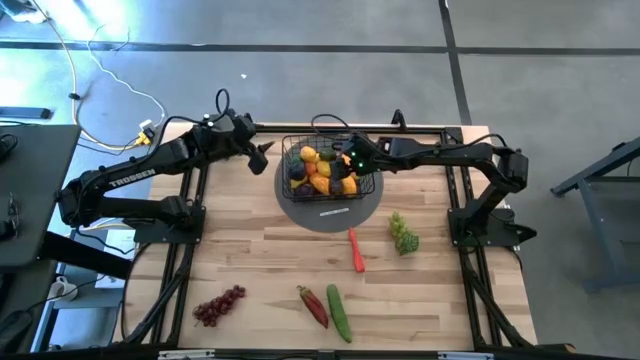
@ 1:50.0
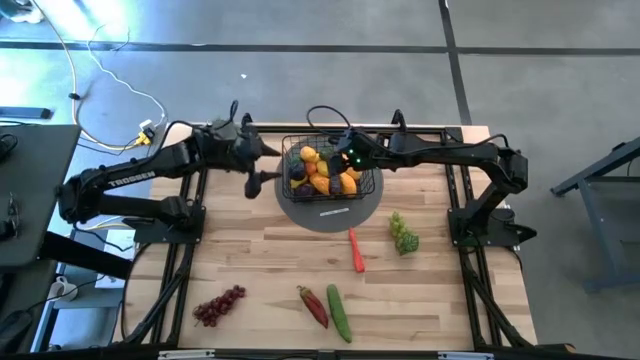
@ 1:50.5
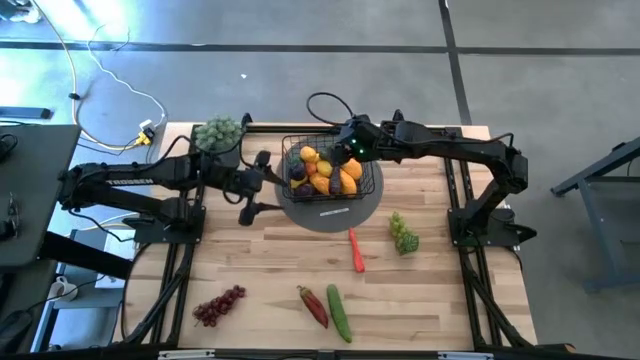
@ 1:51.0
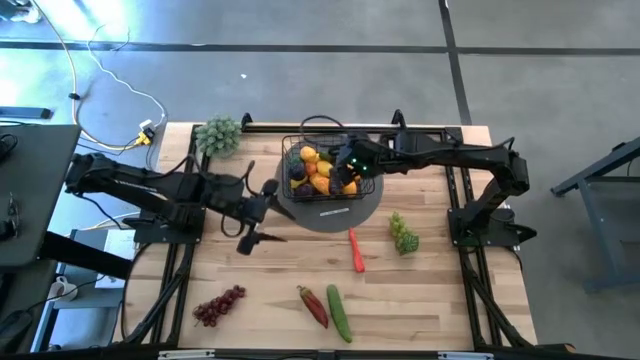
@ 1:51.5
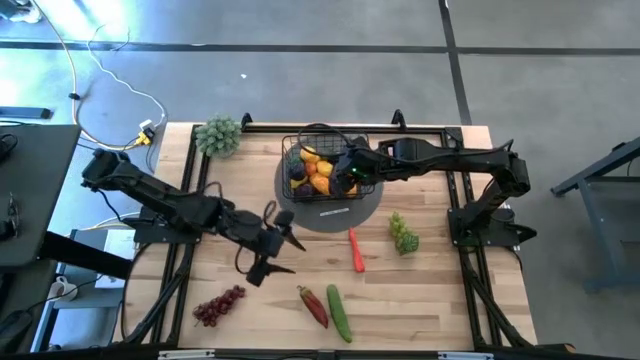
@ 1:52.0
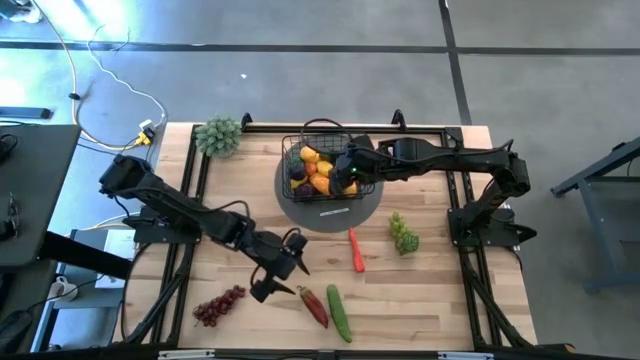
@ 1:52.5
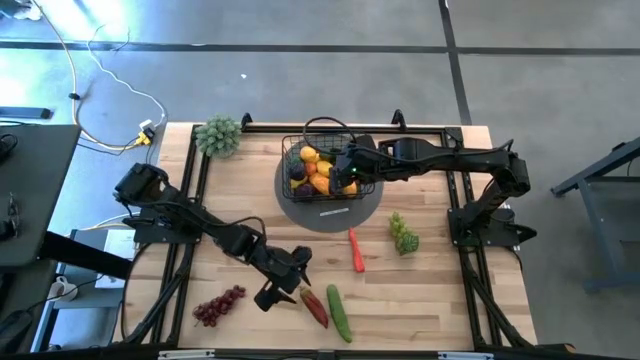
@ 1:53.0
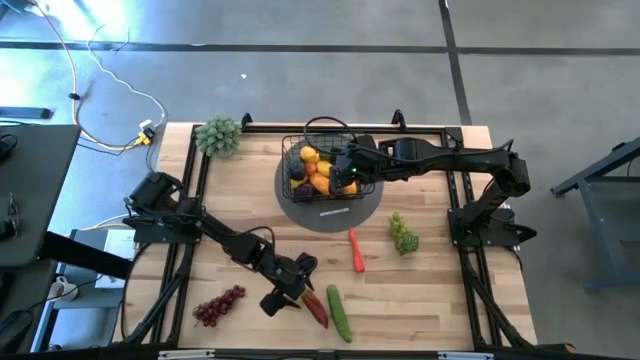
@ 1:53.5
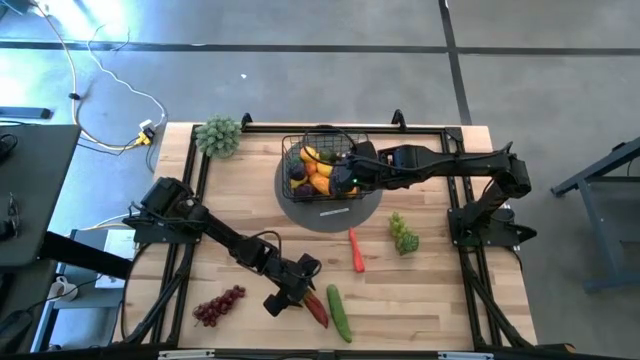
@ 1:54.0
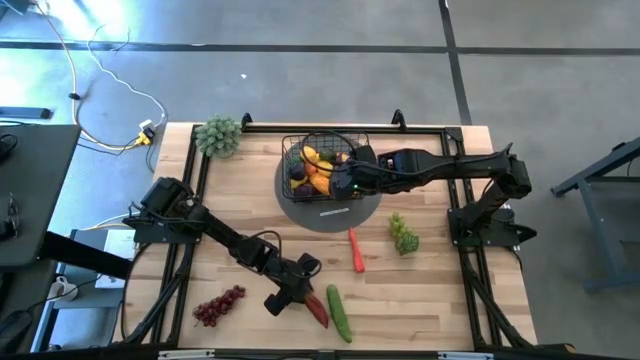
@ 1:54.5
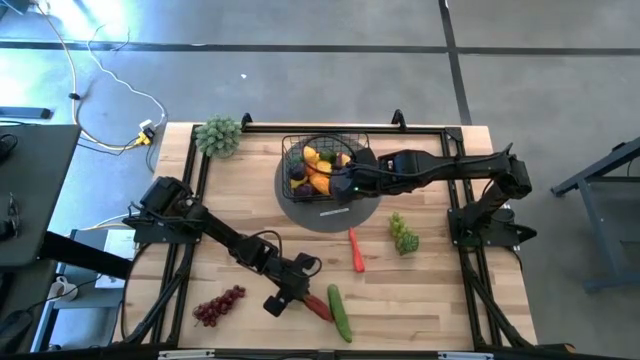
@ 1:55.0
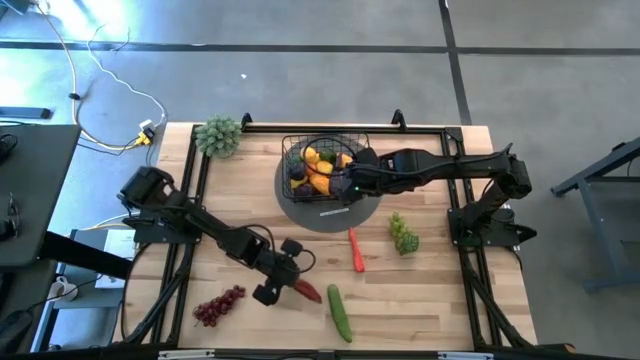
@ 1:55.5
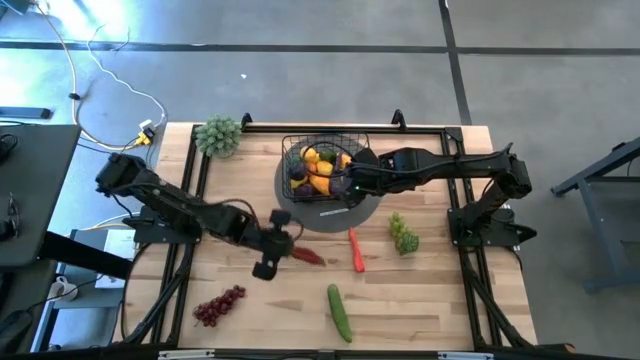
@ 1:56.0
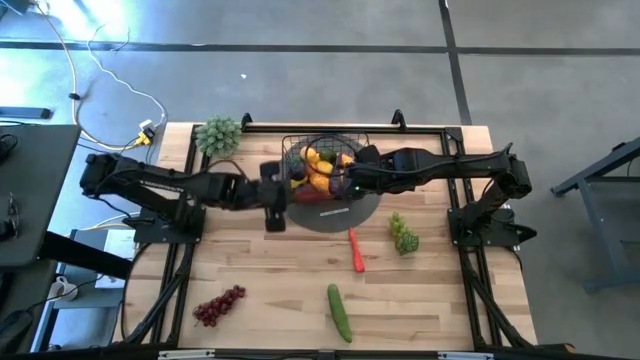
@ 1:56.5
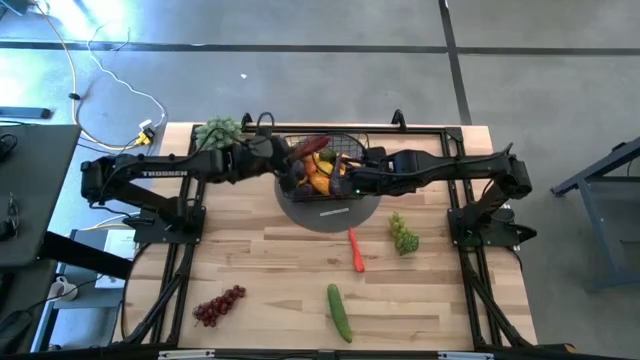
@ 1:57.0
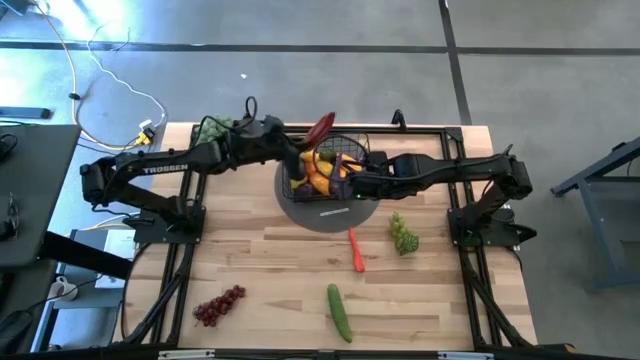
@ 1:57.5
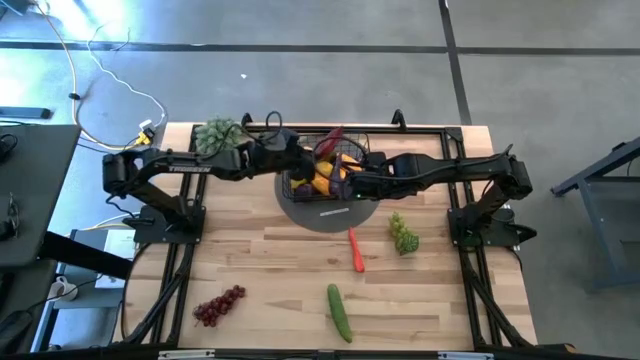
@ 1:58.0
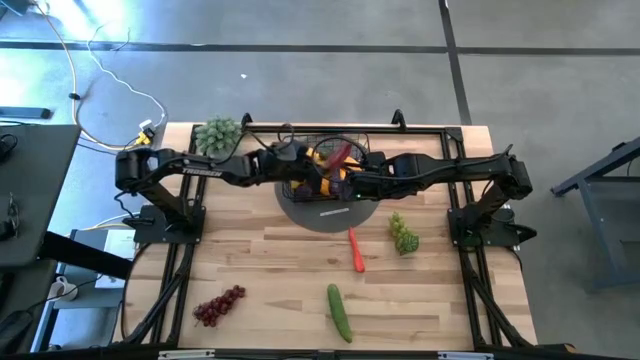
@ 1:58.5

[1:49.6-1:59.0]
Task: Build produce basket
Put the red chili pepper into the black wire basket

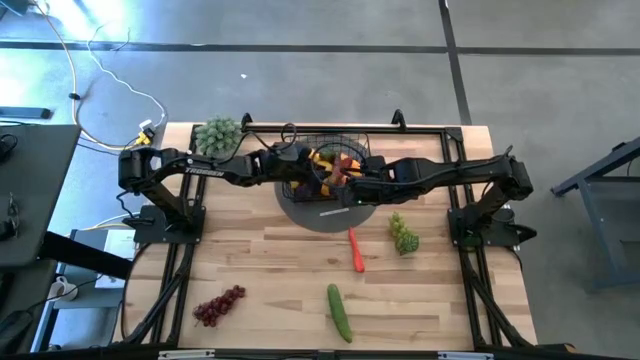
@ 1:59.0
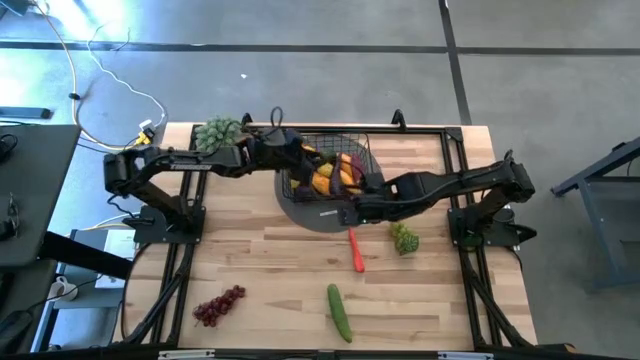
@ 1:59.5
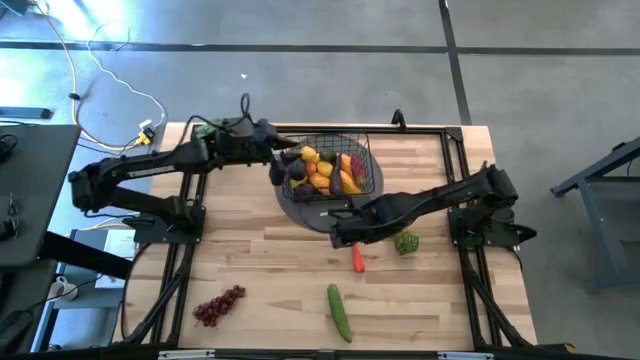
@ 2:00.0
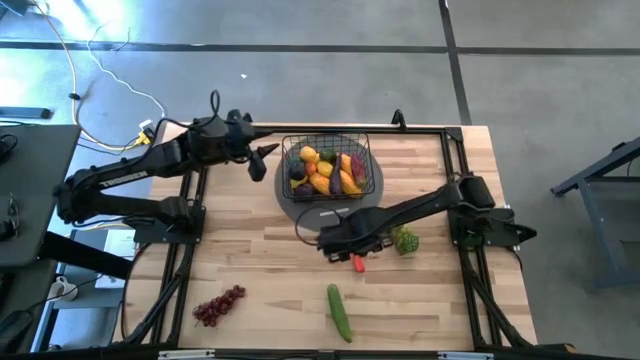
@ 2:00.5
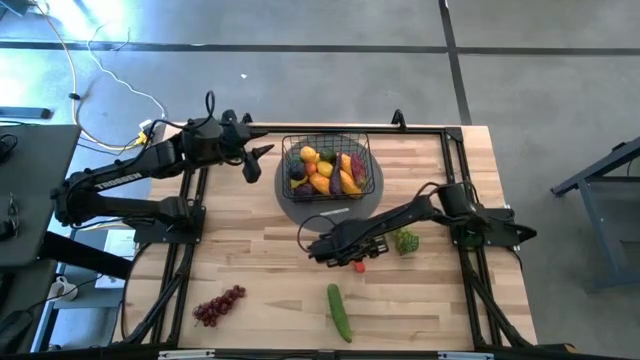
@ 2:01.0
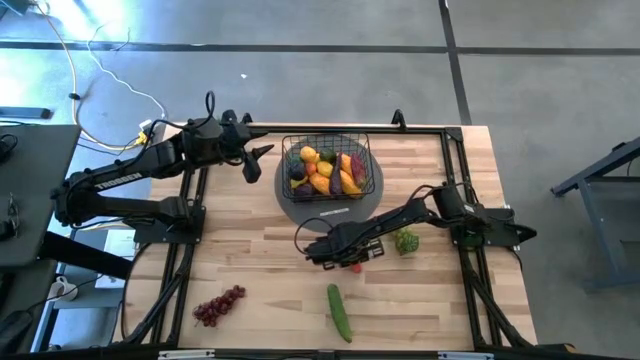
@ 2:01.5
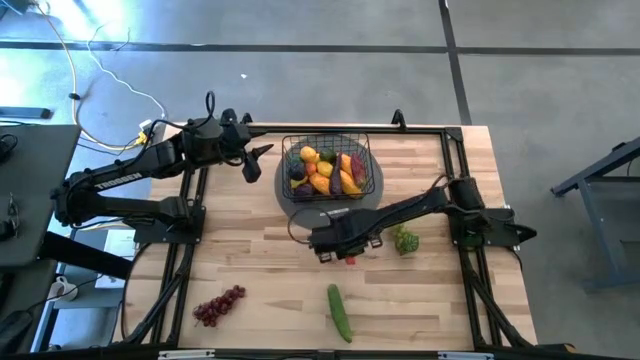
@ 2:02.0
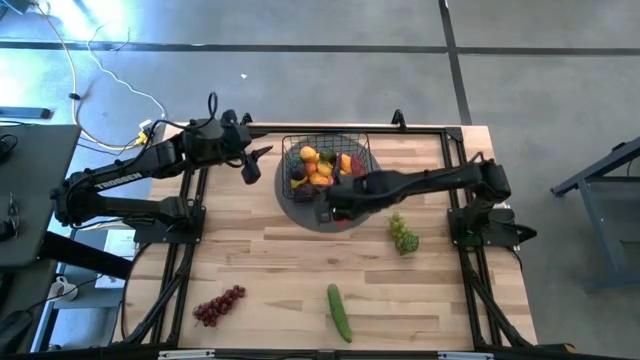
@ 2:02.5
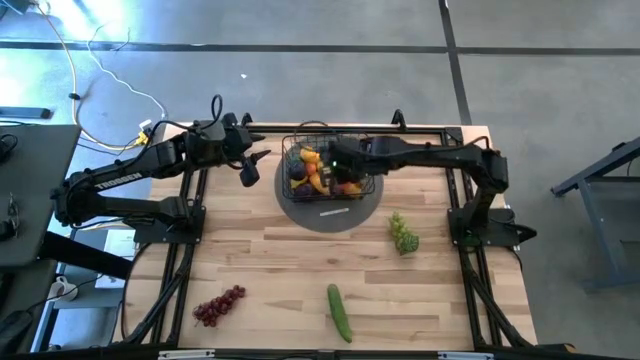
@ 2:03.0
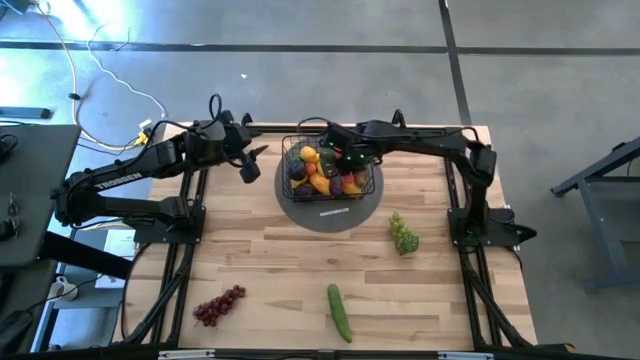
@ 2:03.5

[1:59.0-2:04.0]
Put the carrot into the black wire basket

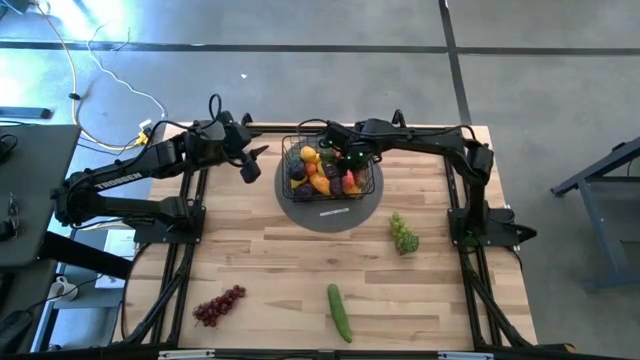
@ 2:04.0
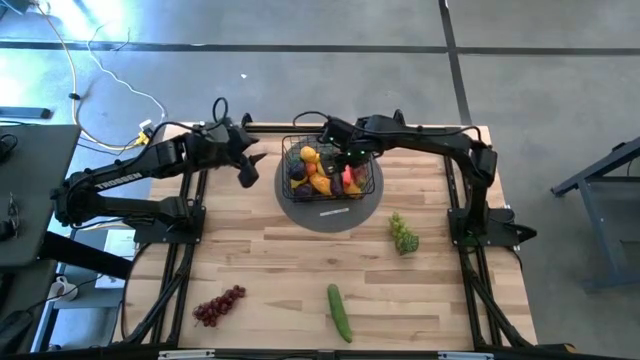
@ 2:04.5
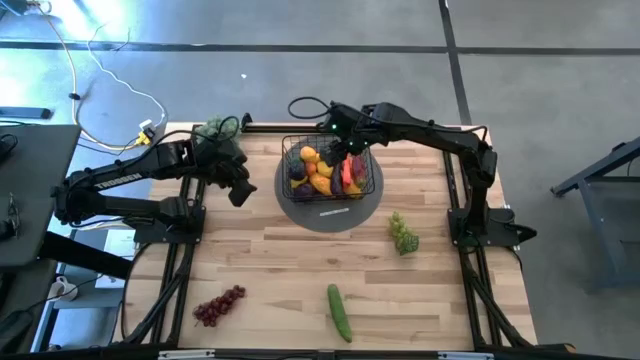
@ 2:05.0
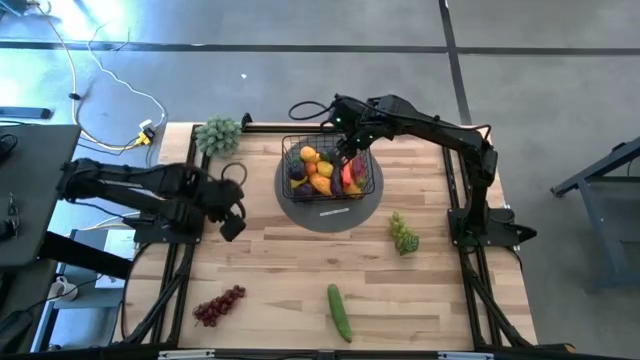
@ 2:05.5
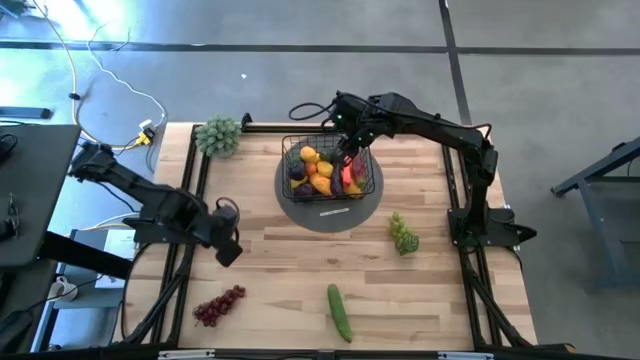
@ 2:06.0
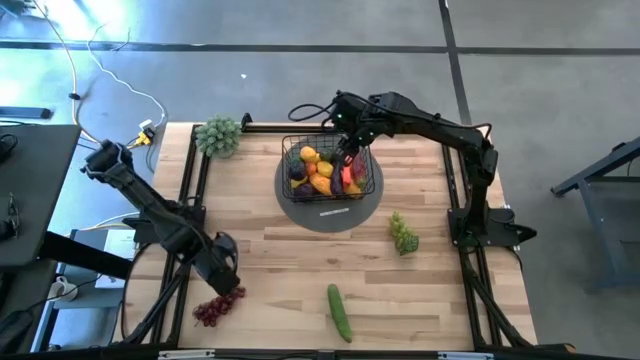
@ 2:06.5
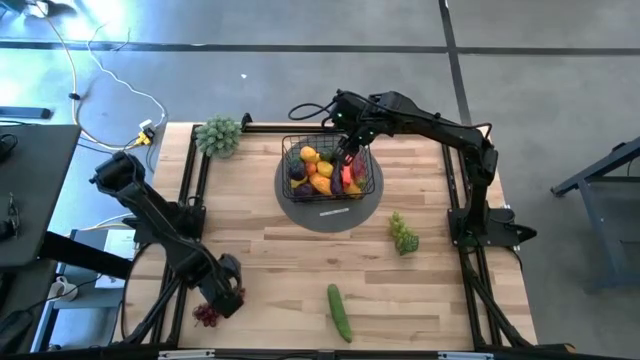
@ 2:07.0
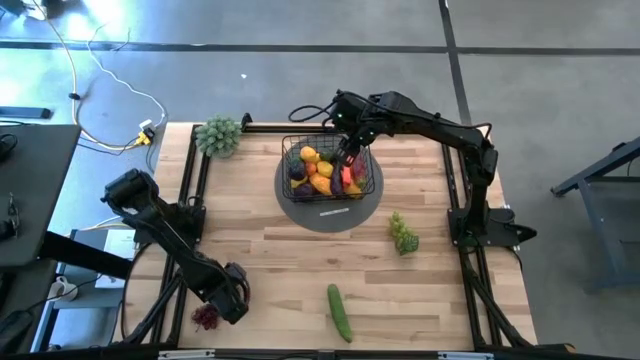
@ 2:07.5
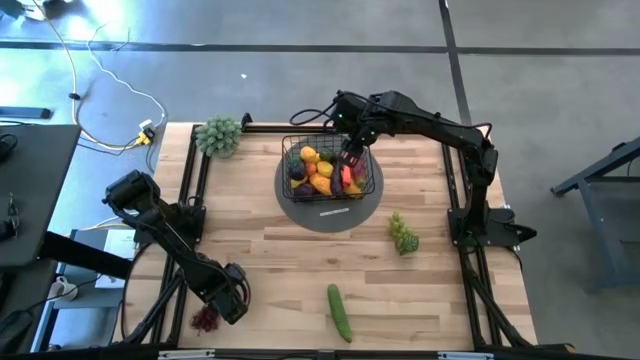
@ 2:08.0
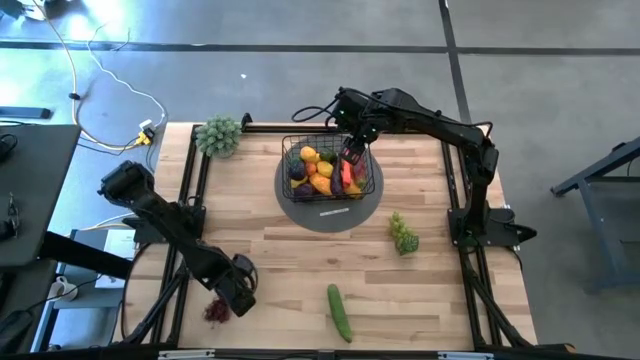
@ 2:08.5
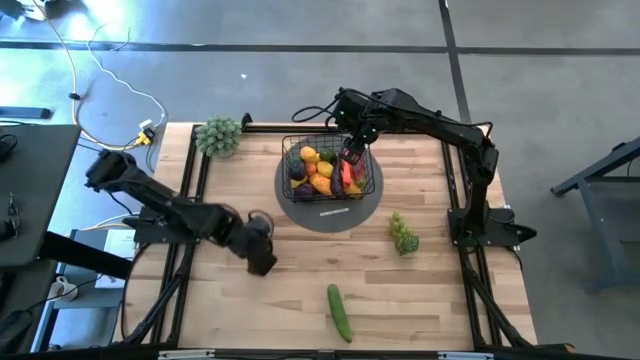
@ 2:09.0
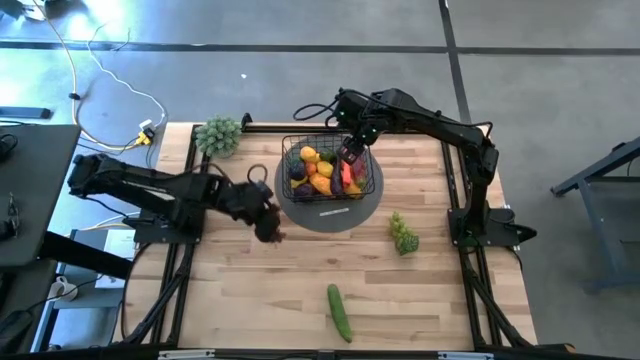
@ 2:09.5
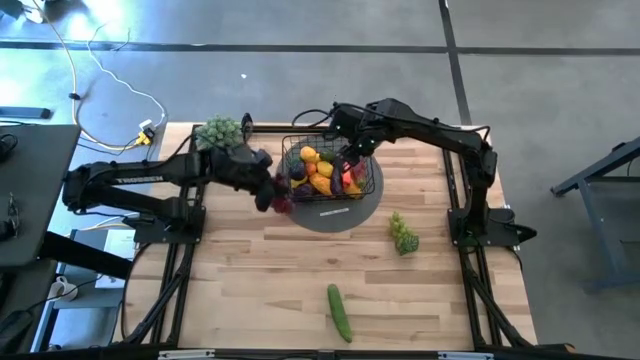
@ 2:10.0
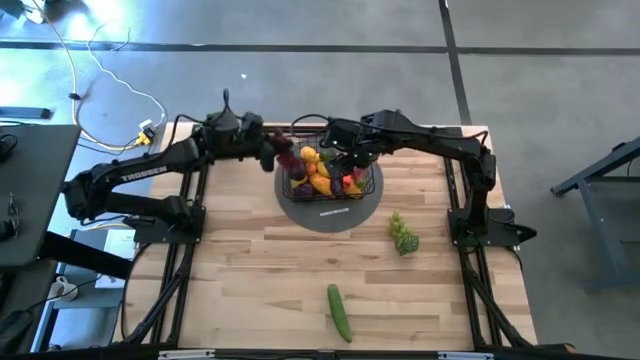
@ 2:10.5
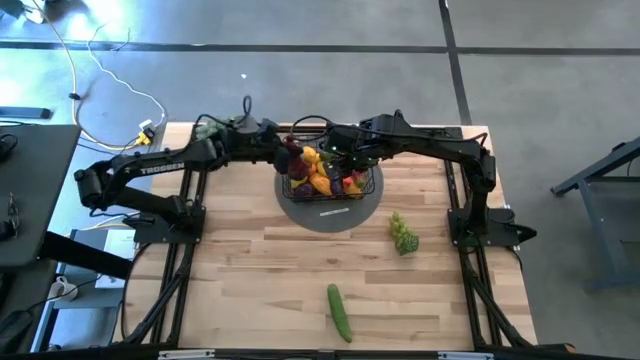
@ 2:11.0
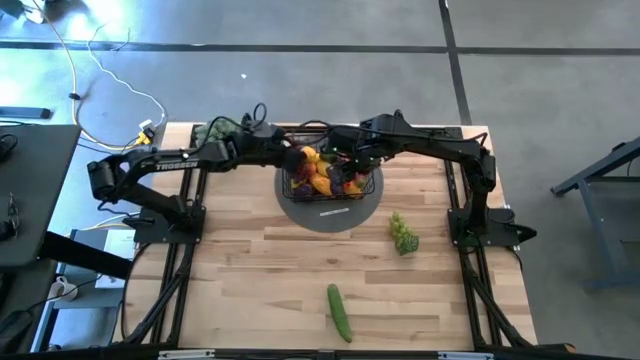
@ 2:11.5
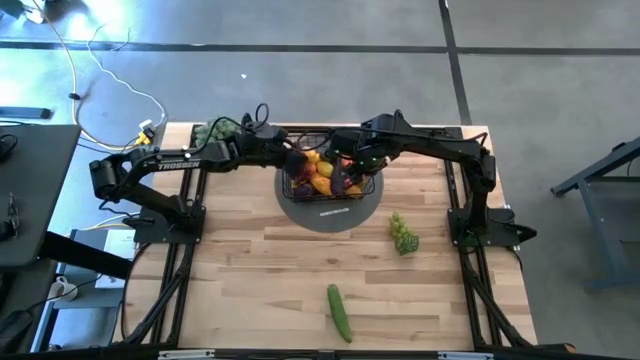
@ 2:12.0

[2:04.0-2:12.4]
Put the red grapes into the black wire basket
